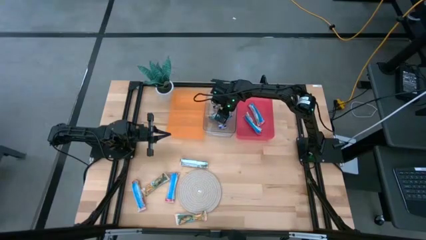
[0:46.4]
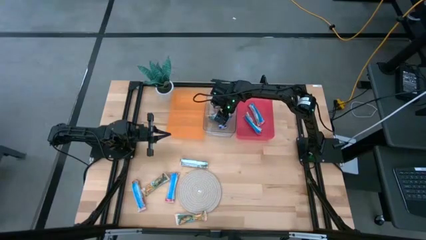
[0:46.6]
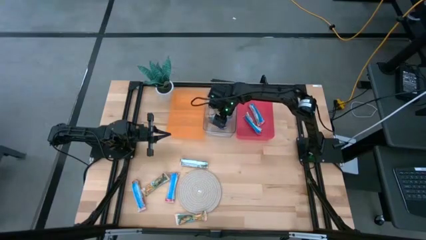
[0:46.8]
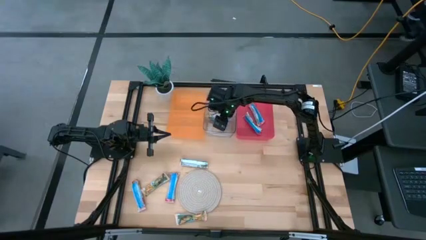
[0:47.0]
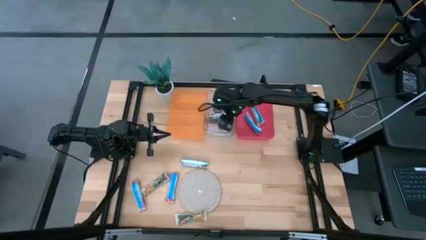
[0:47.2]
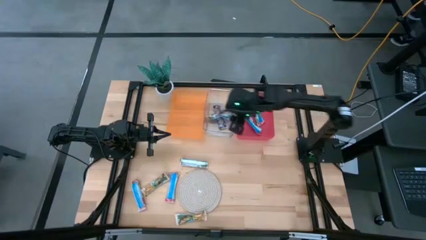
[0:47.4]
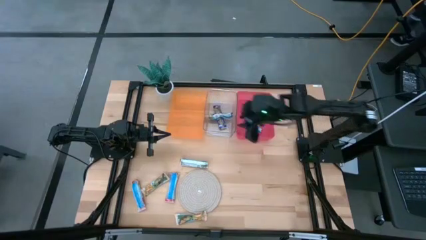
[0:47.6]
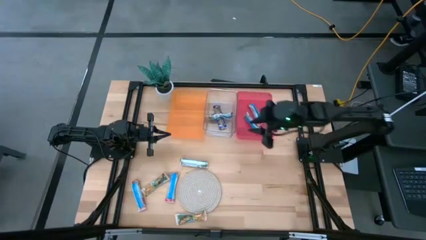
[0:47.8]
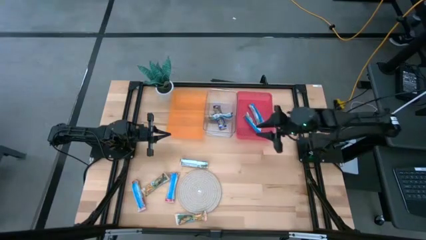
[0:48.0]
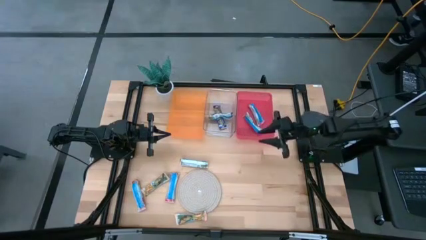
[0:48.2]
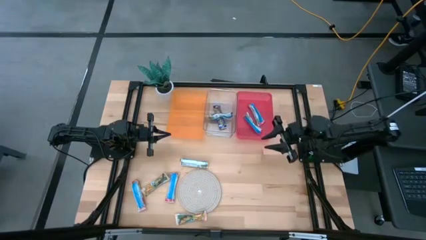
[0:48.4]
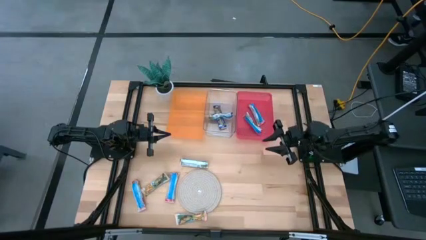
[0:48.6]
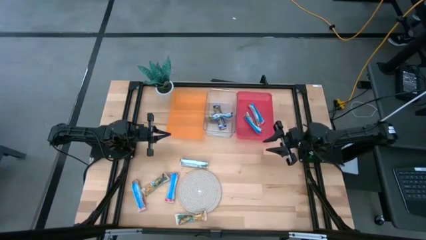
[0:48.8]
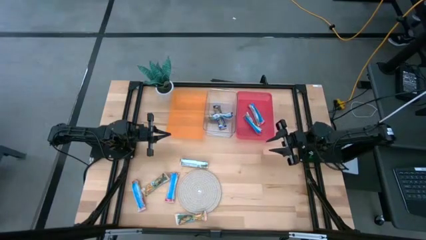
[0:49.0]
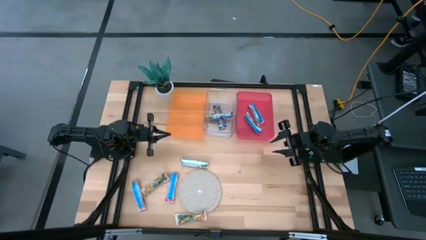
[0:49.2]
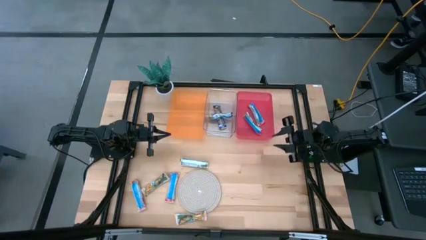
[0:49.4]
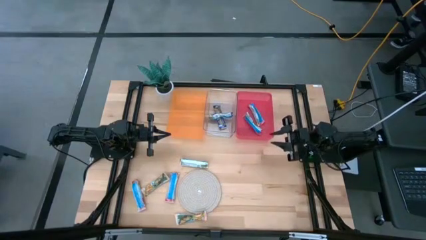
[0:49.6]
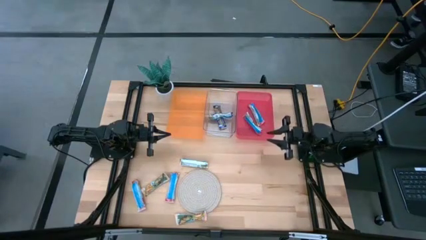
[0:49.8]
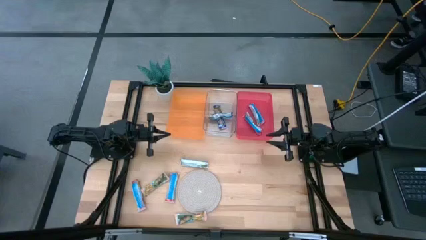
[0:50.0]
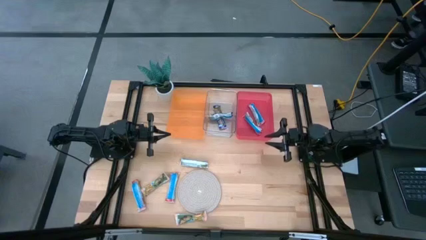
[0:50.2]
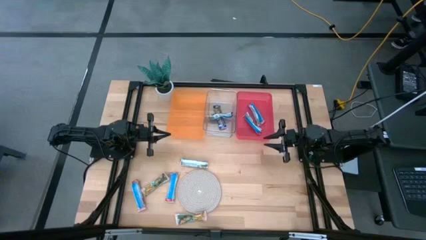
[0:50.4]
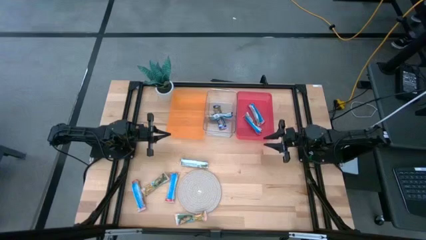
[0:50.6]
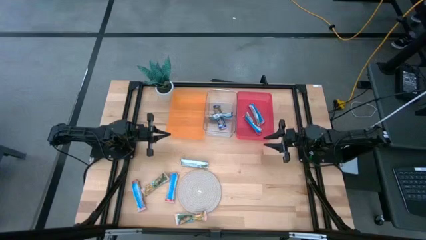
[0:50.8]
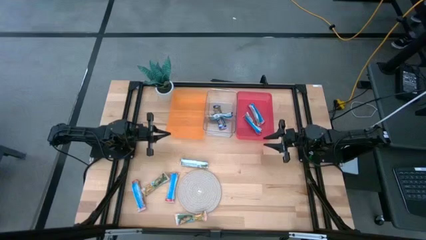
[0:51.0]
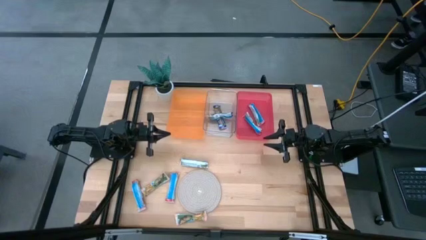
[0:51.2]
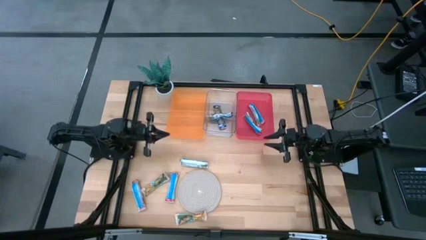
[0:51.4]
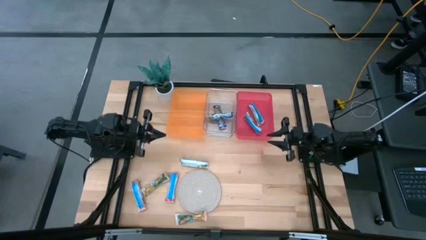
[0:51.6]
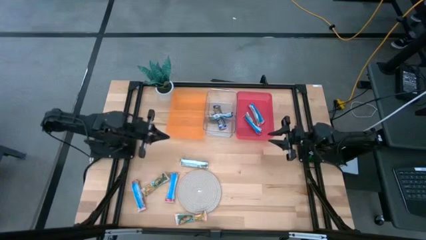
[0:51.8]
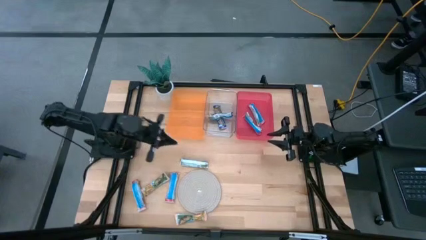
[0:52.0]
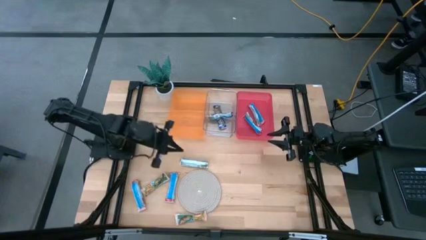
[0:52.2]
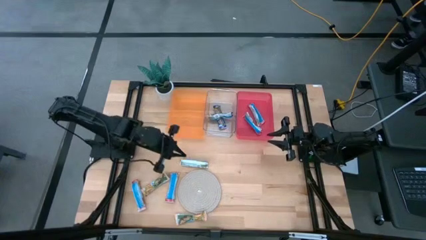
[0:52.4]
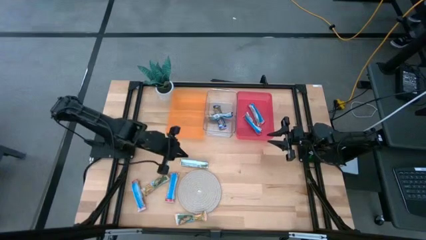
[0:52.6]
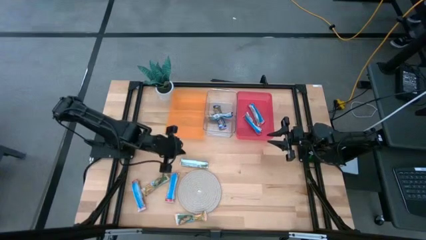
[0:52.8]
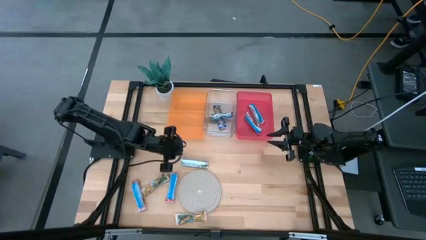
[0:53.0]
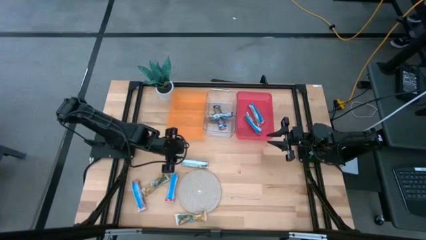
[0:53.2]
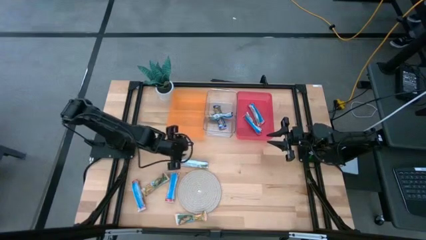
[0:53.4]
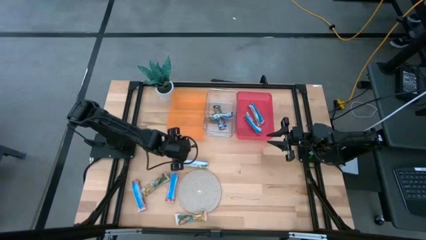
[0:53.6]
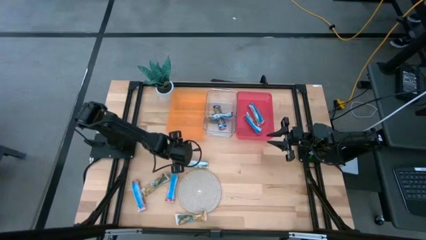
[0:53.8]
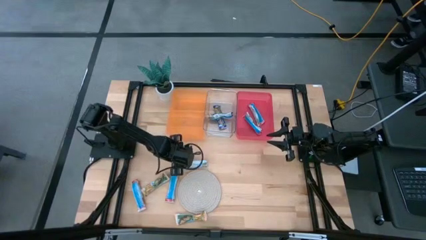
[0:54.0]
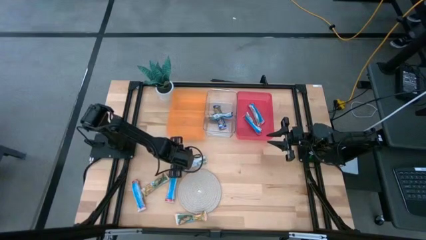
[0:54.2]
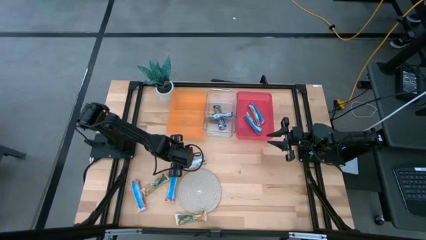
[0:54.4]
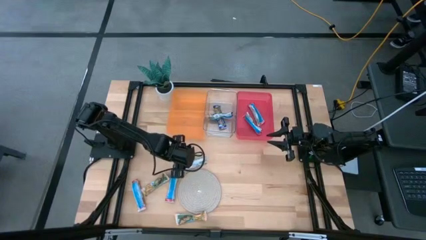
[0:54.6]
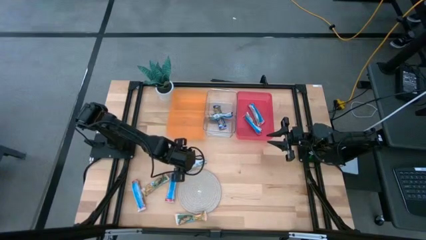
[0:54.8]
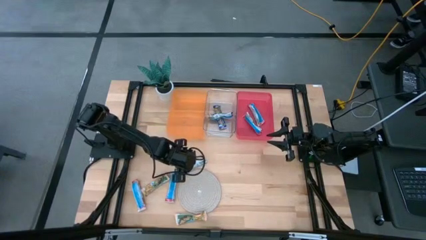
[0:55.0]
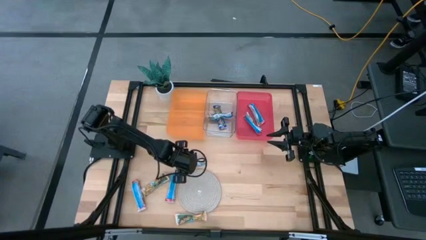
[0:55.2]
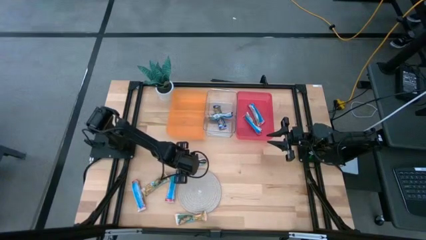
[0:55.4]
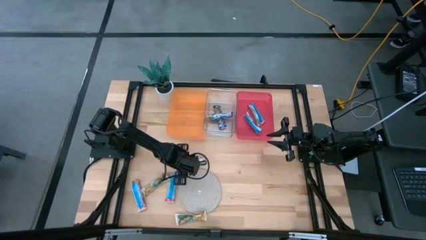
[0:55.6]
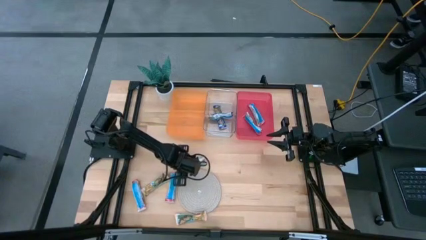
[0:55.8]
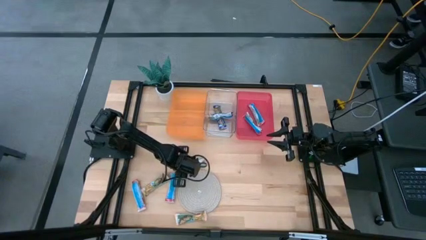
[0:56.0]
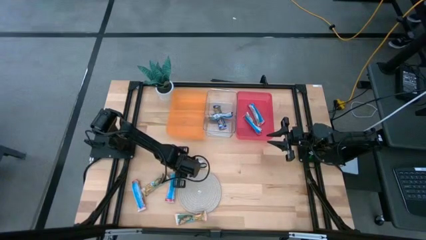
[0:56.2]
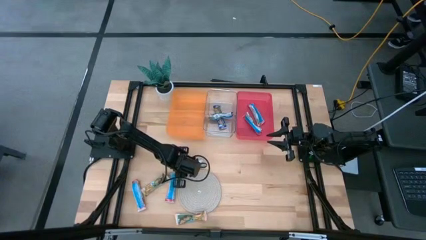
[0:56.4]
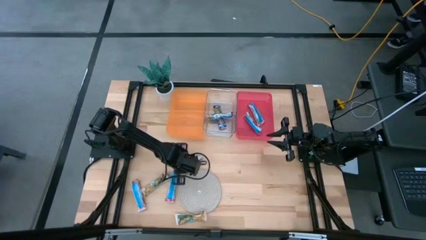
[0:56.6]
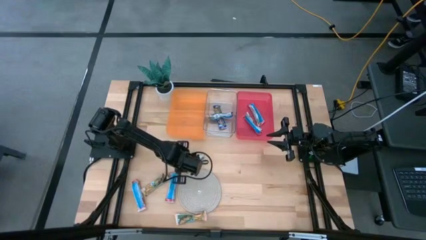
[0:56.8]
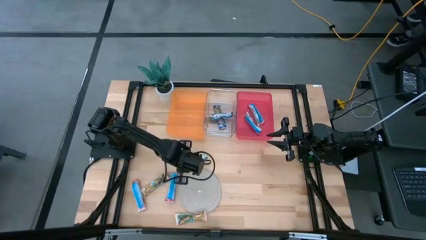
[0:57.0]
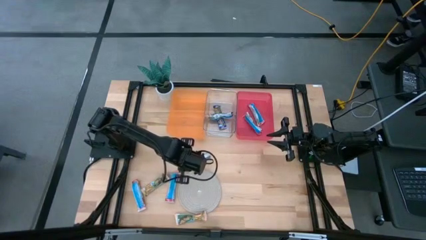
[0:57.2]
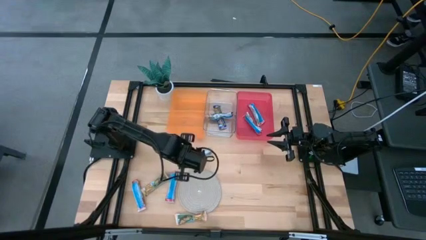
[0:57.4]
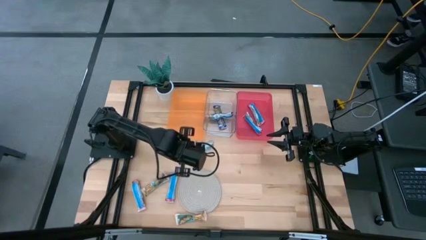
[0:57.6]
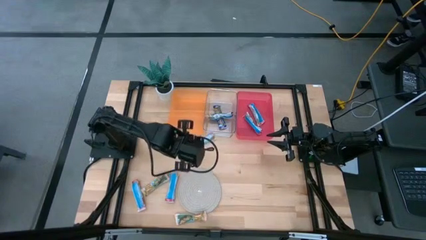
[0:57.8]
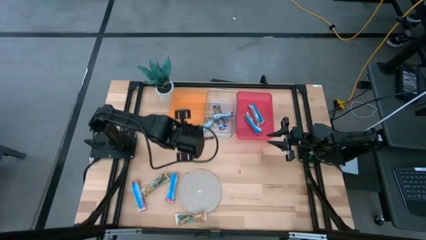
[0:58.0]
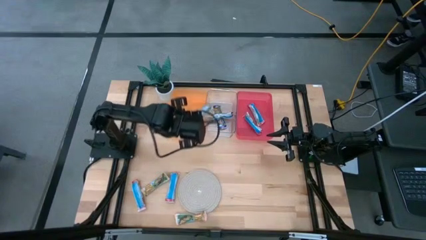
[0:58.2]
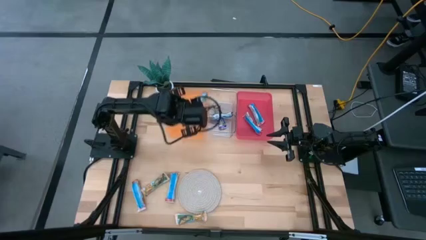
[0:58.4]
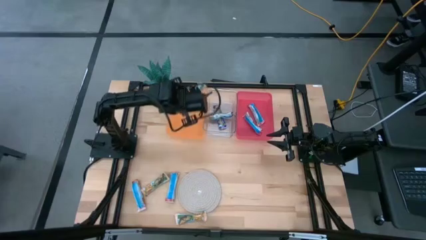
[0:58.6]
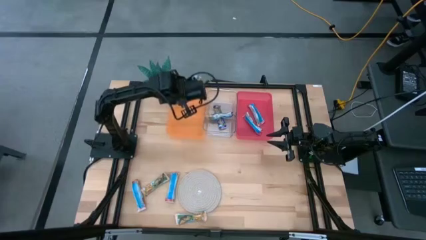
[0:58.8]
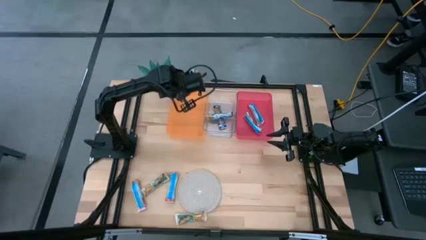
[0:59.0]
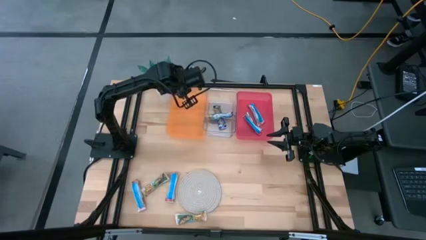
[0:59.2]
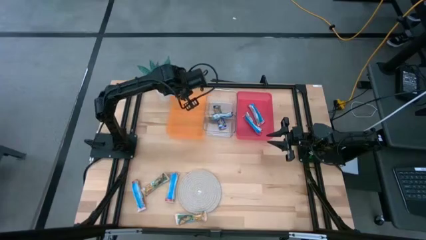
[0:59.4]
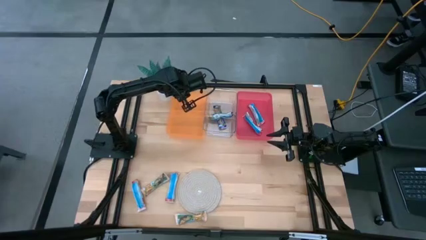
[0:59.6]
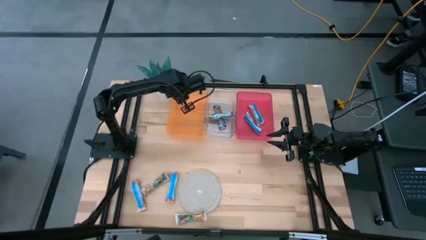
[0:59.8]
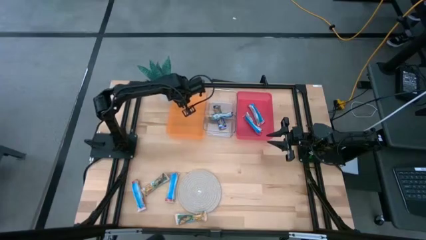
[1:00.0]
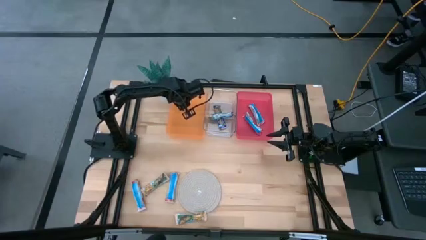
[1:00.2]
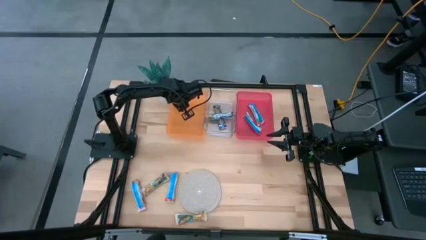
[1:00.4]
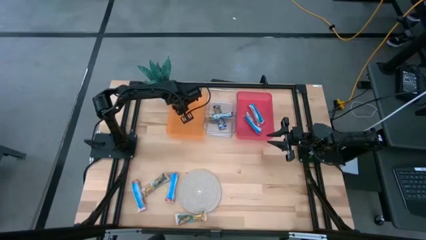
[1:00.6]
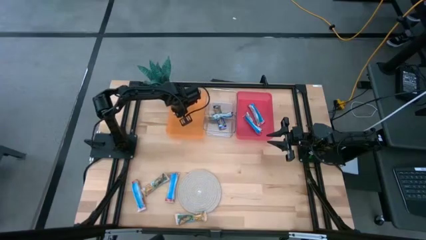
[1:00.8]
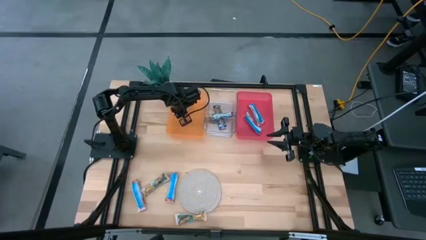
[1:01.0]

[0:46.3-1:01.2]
Task: Pick and place Granola Bars by type
Put the top orange granola bar into the orange bin
